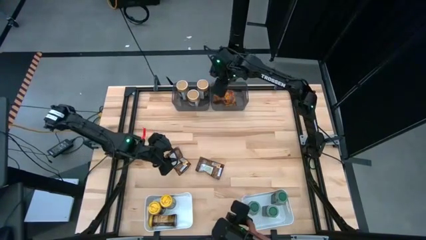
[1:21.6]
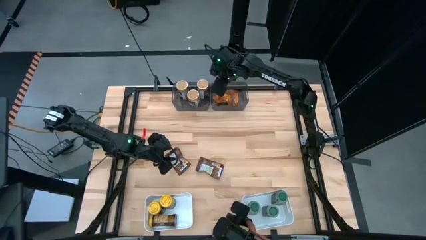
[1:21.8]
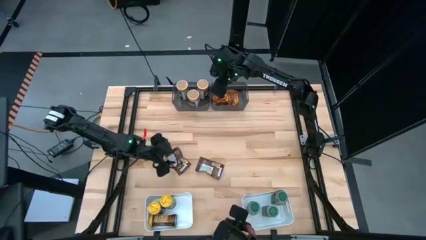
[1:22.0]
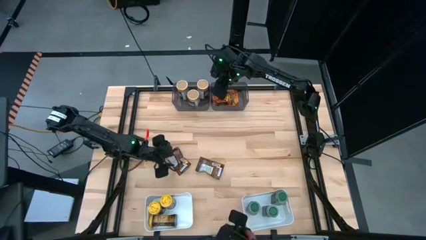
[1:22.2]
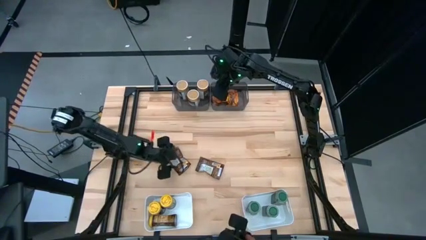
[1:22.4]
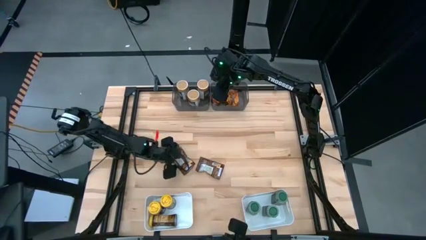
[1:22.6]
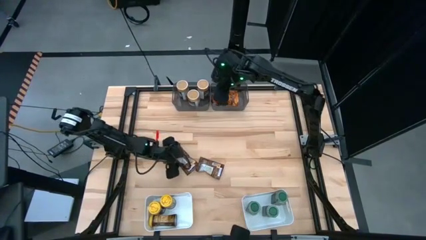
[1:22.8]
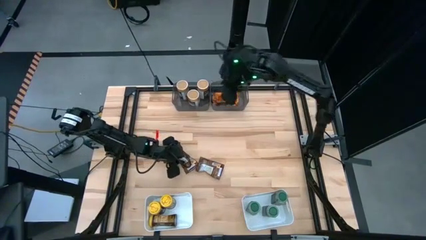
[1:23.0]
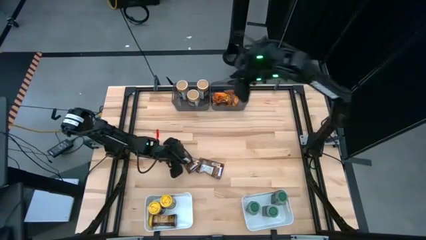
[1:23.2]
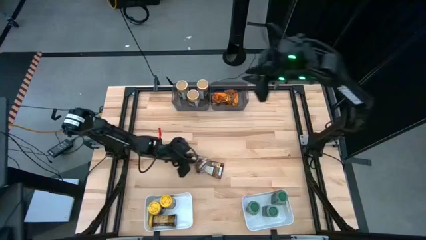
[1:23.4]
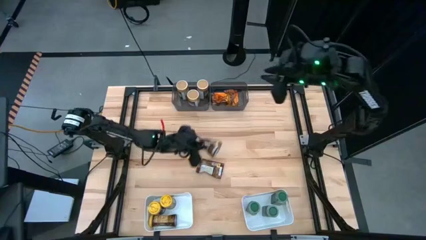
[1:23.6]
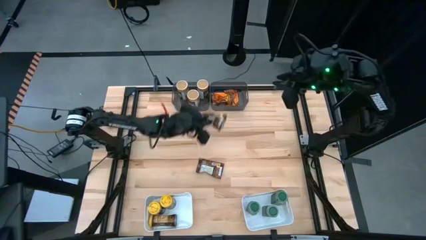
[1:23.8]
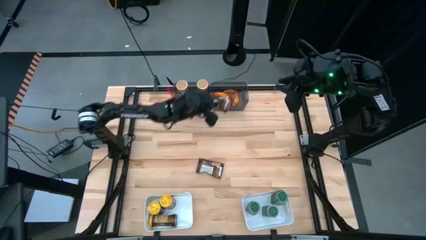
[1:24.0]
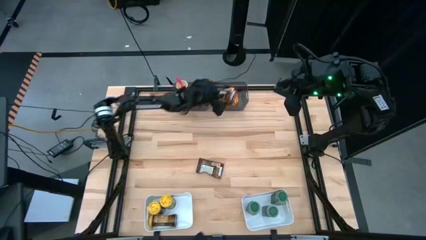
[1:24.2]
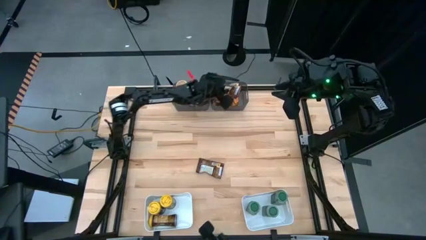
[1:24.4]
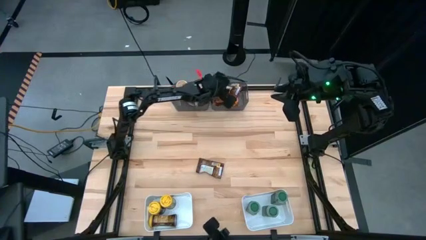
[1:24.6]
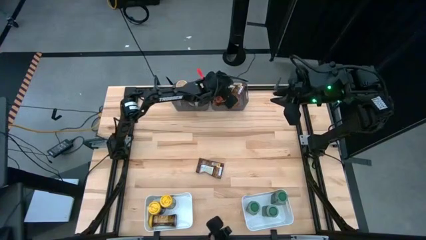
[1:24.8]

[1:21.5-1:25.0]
Task: Sort spices by type
Put the left orange seasoning pack into the right black bin

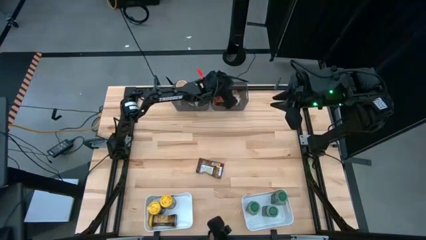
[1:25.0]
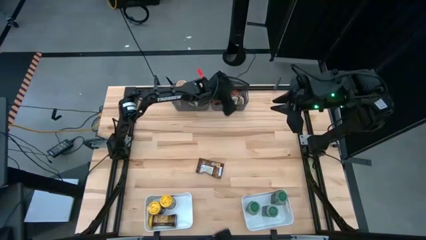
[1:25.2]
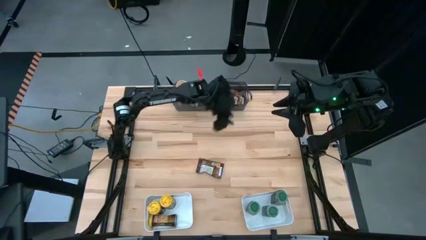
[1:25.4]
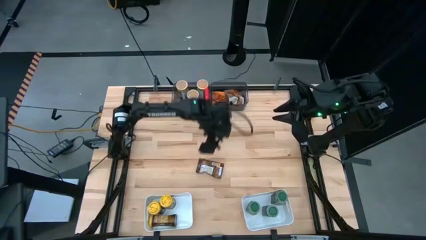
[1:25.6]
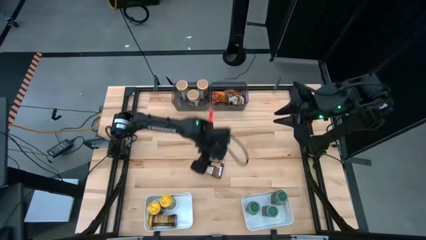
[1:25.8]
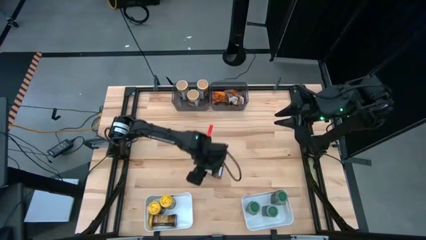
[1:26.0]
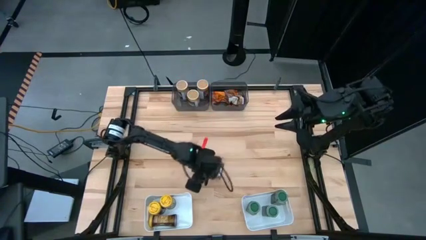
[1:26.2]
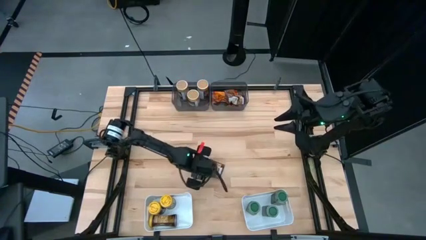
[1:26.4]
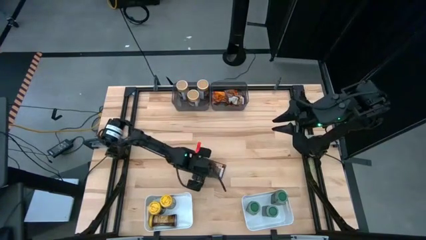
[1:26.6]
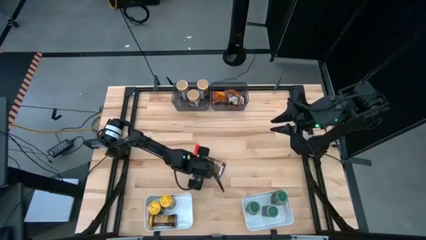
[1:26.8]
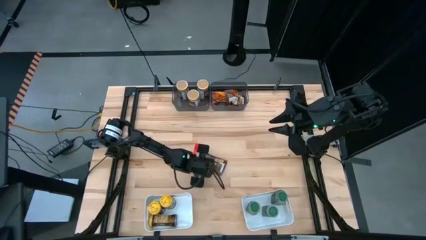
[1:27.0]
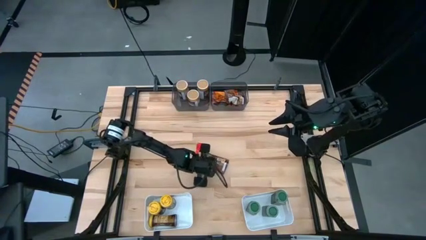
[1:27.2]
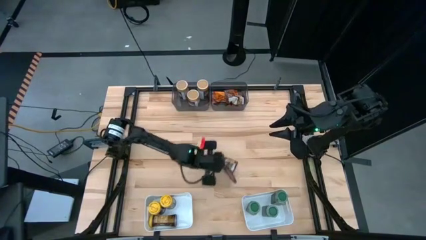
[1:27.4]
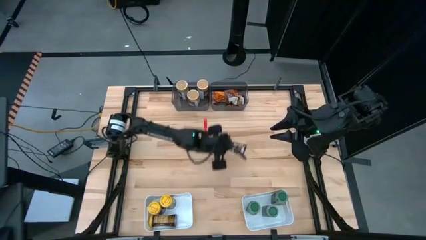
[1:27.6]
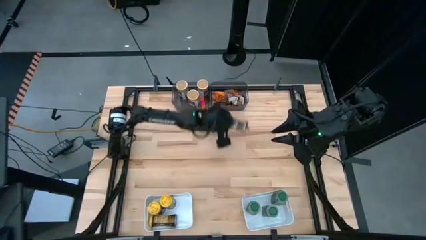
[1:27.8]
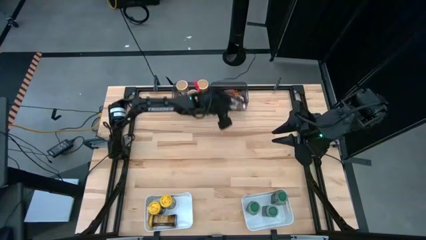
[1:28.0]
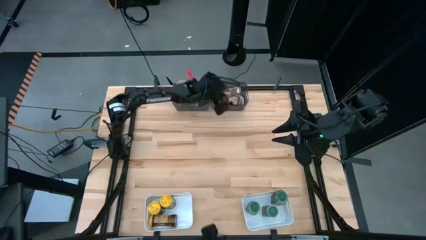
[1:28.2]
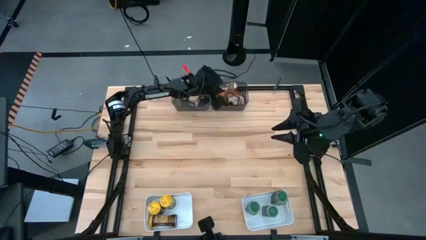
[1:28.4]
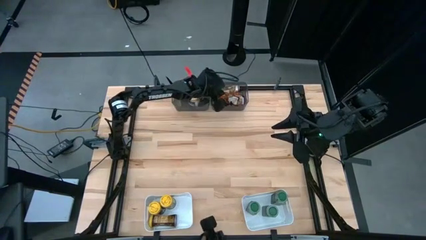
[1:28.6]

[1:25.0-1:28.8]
Put the orange seasoning pack into the right black bin

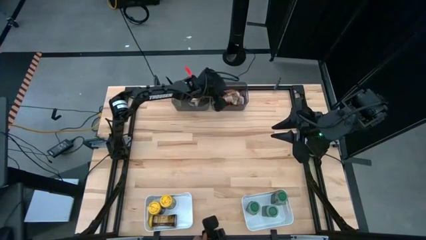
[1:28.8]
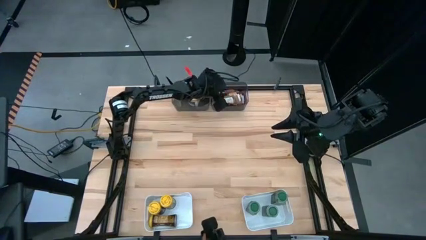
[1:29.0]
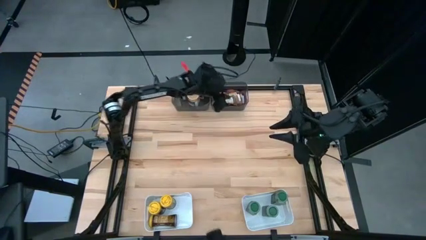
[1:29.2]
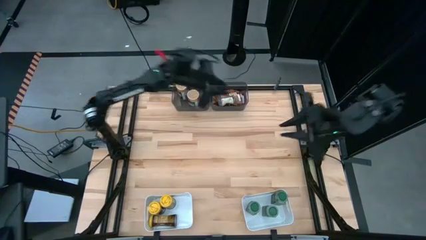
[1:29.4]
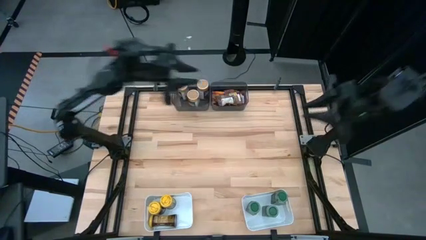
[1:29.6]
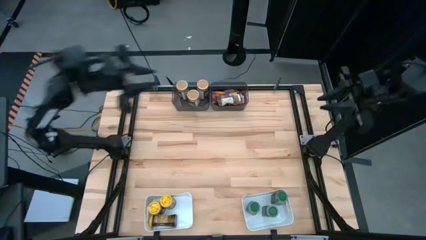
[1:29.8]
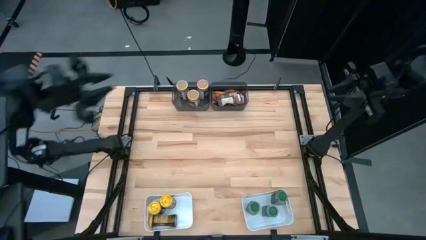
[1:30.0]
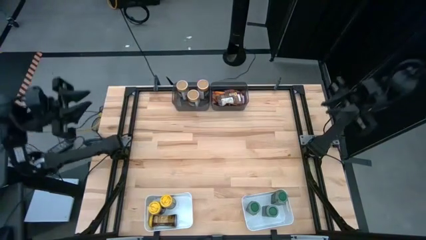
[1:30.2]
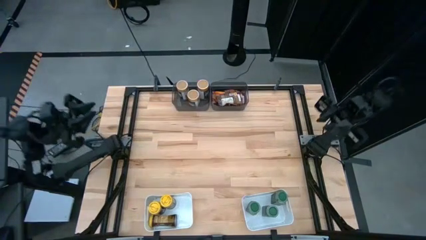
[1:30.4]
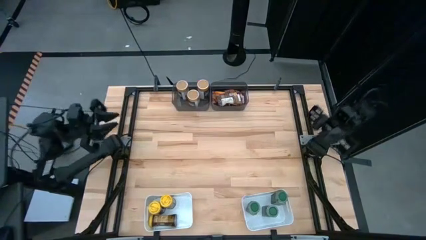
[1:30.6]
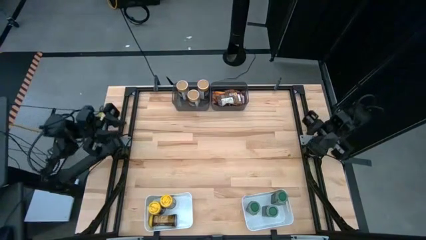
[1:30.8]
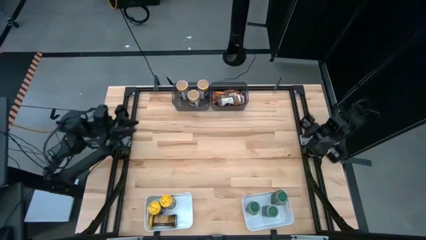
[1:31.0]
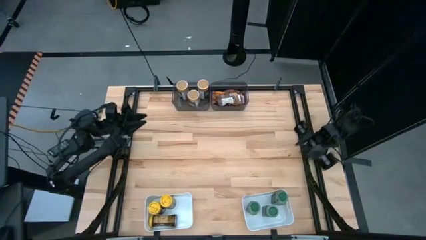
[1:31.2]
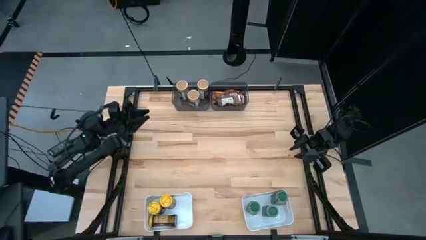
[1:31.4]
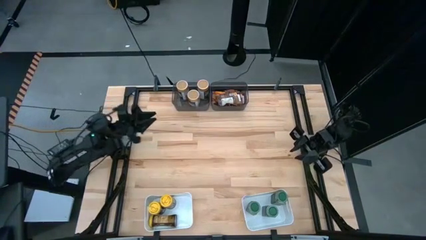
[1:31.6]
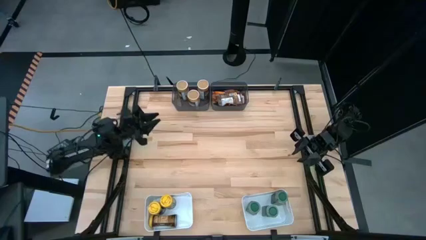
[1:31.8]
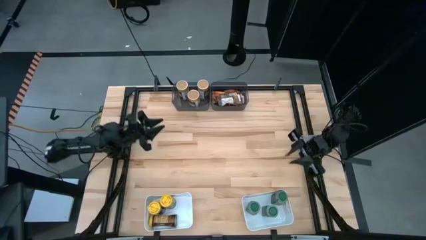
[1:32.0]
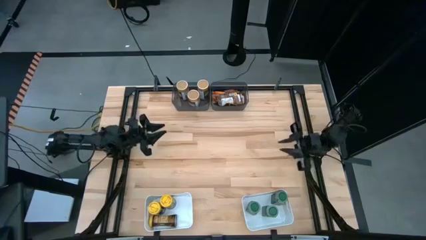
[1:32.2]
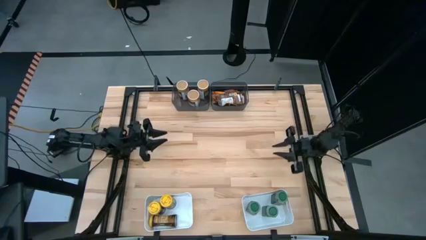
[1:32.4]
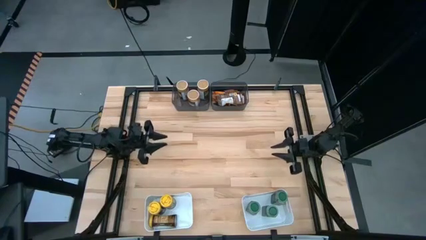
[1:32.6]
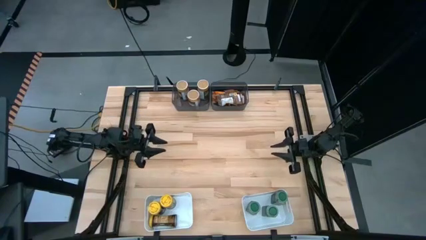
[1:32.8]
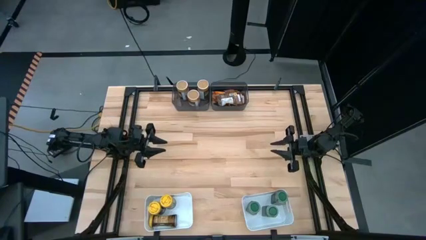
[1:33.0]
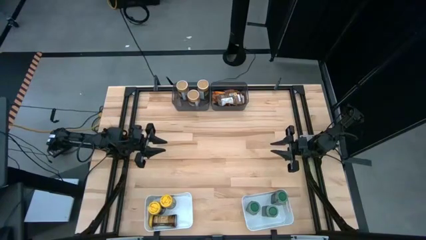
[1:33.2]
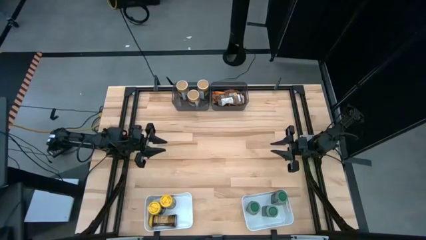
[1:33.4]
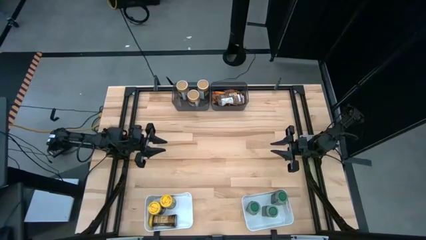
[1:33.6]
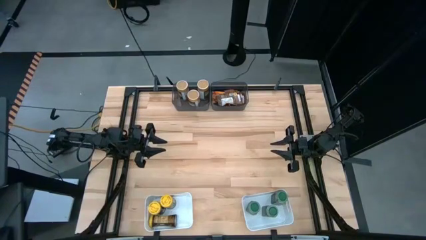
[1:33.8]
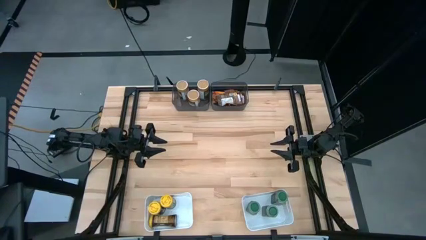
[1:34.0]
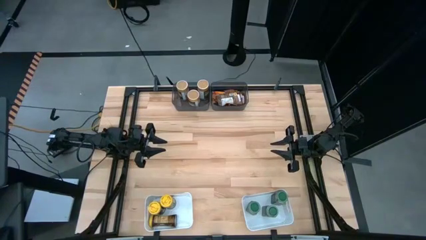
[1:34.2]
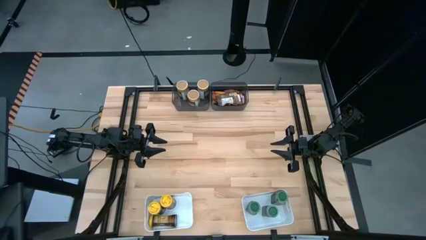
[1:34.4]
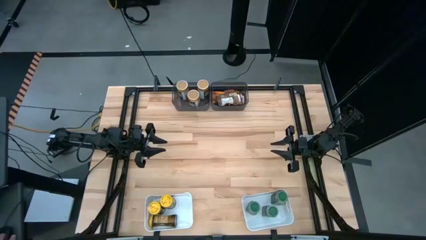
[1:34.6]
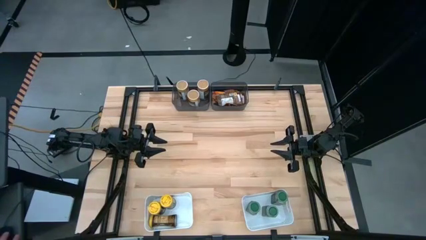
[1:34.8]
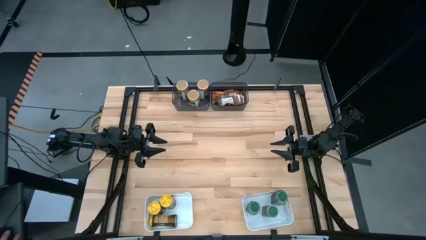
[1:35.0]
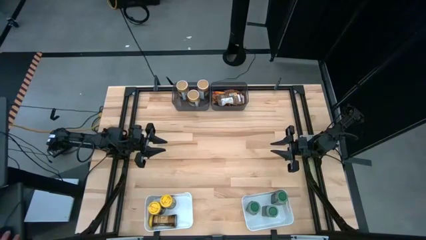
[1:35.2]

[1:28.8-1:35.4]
Return to home position

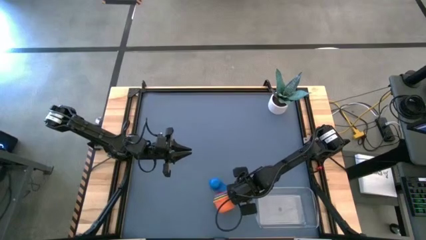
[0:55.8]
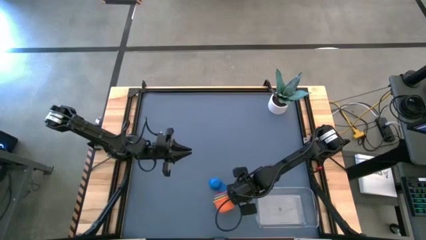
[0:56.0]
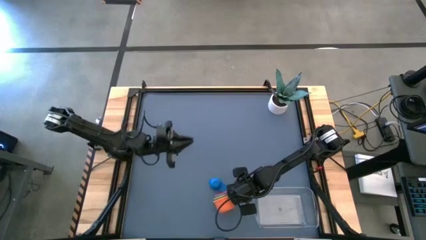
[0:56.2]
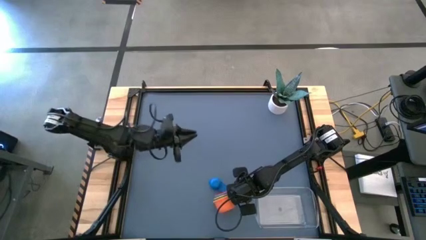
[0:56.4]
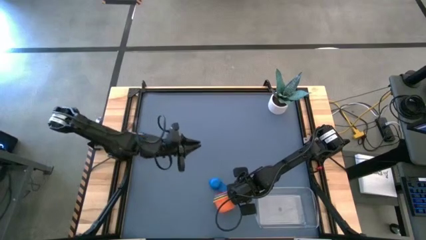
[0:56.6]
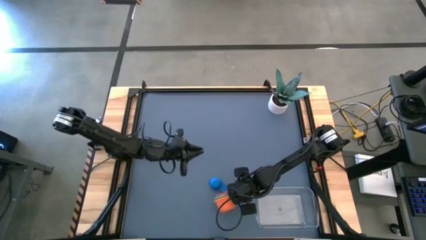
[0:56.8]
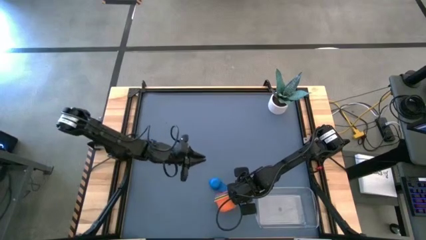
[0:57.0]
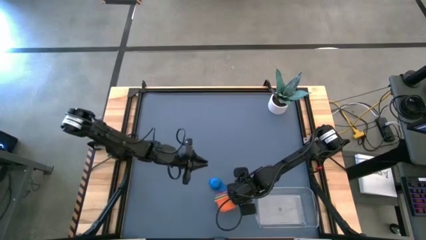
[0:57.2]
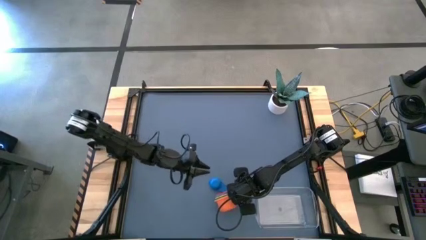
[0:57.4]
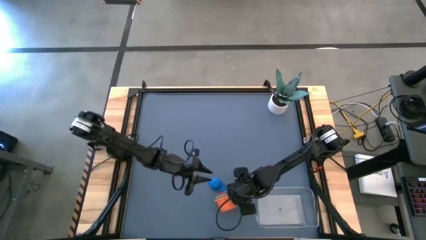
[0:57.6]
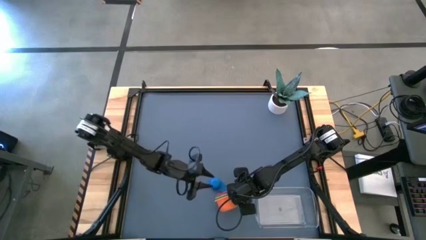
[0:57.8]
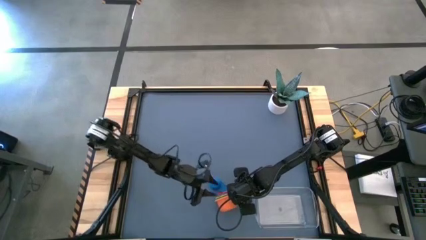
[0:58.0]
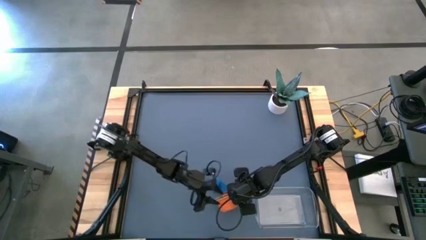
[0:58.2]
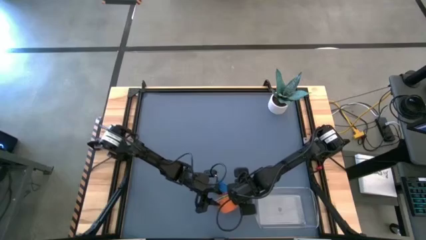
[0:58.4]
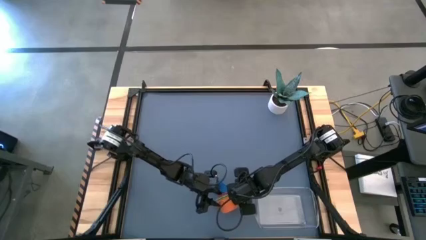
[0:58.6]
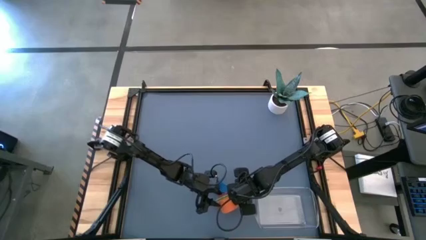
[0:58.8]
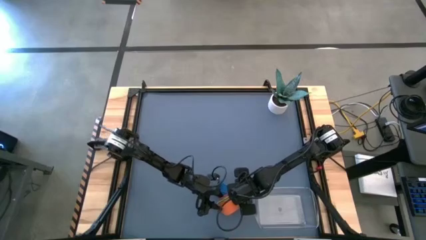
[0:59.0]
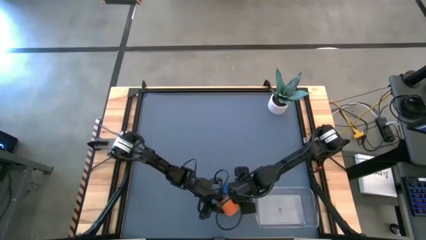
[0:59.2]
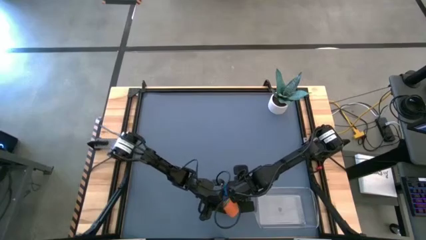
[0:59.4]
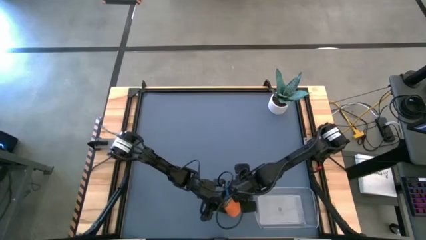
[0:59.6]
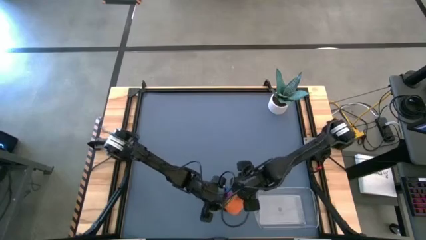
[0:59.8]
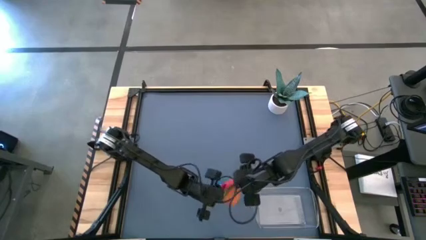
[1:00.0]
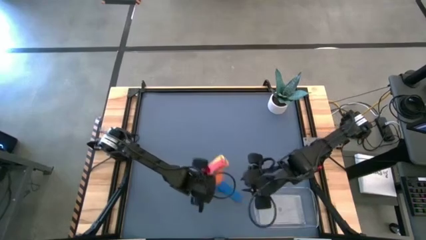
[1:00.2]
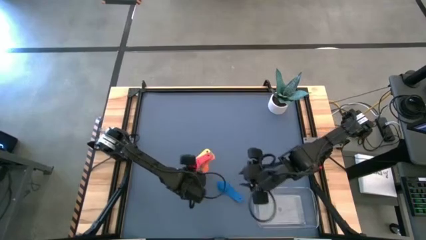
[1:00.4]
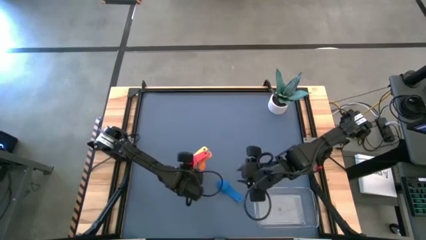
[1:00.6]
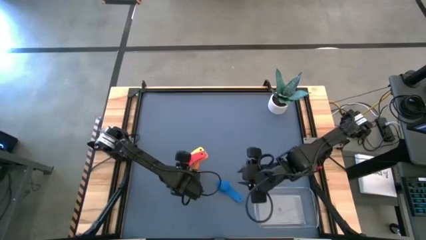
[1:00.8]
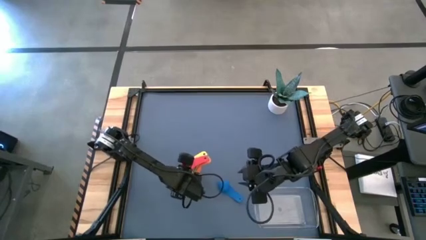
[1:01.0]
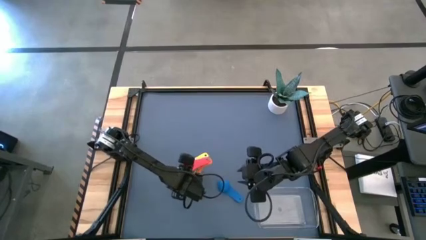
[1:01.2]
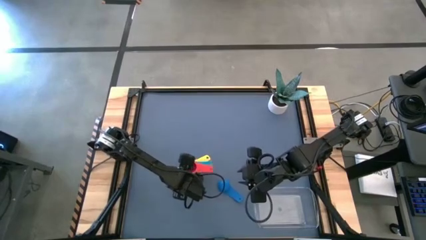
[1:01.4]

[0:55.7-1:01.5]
Task: Nest measuring cups in basket
Adjust the nested measuring cups
